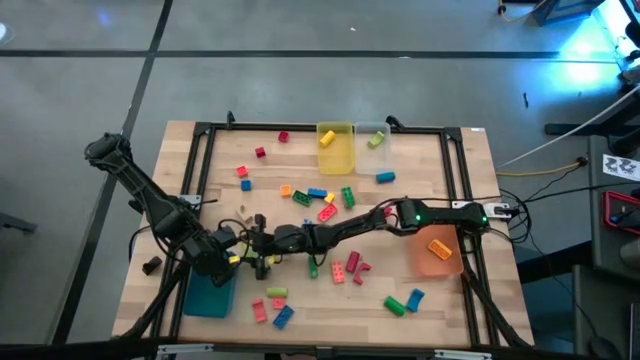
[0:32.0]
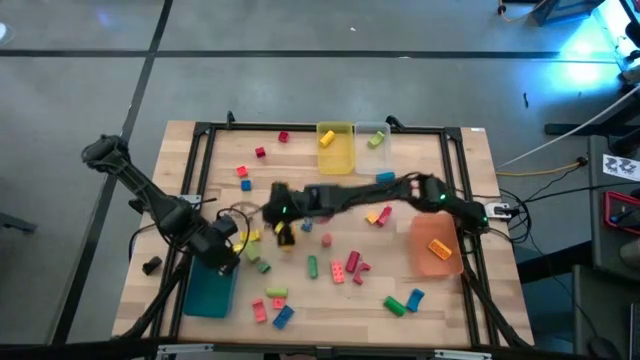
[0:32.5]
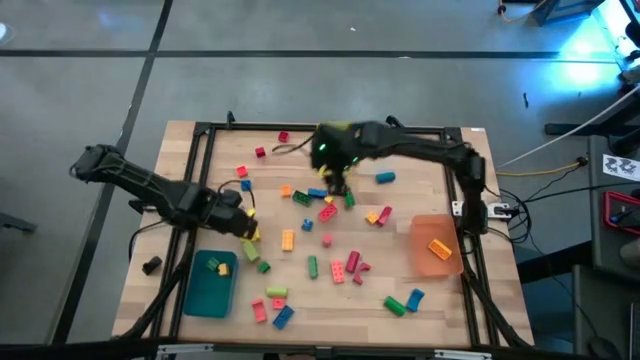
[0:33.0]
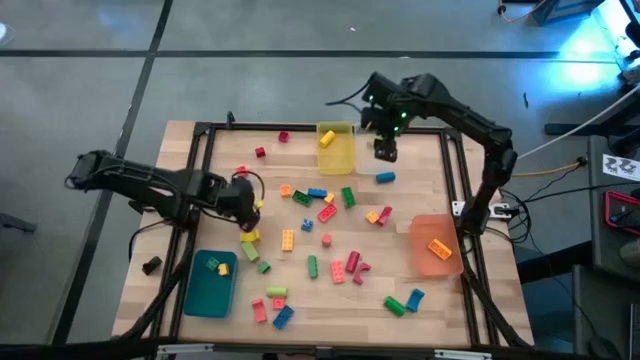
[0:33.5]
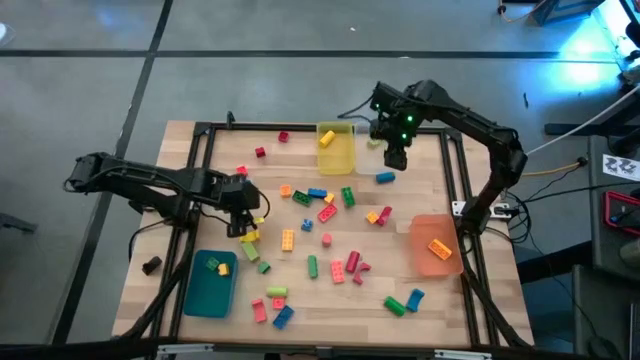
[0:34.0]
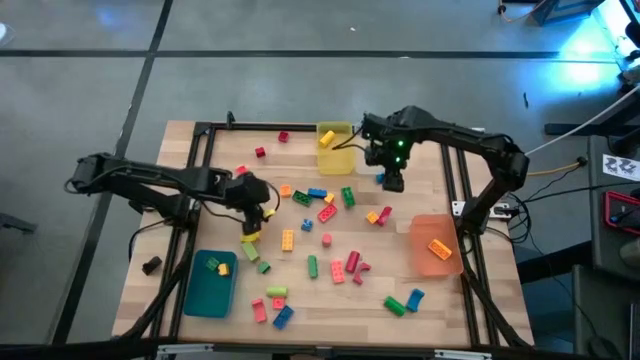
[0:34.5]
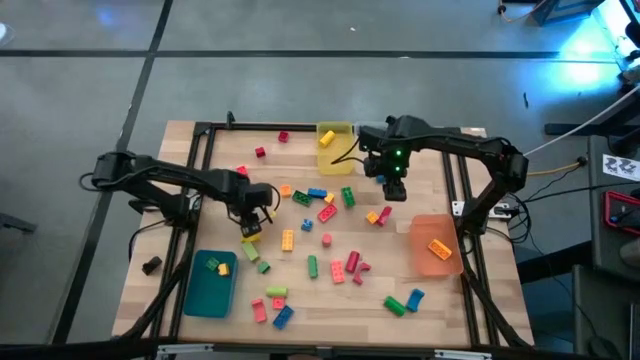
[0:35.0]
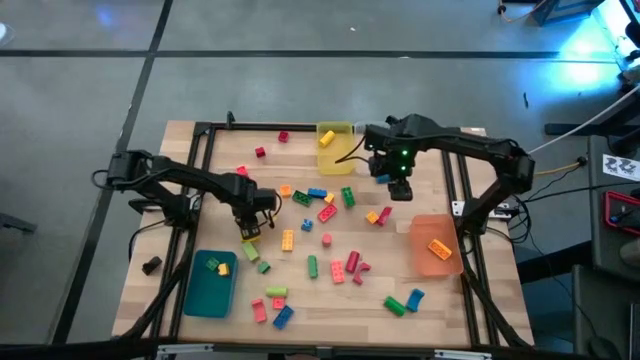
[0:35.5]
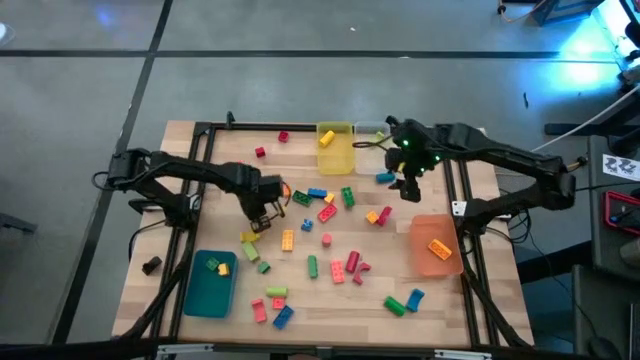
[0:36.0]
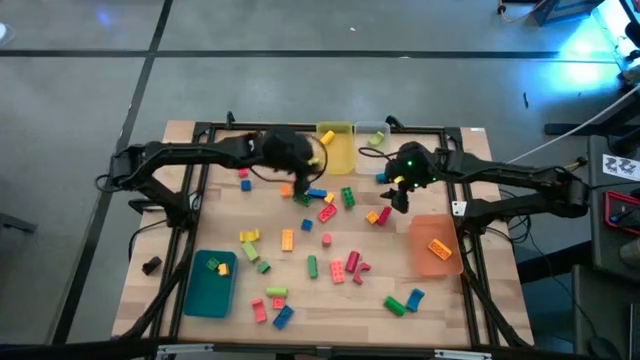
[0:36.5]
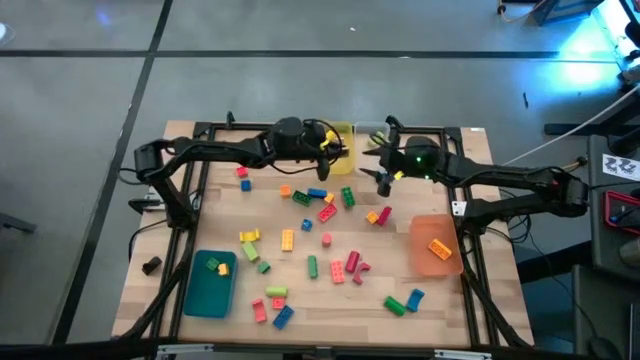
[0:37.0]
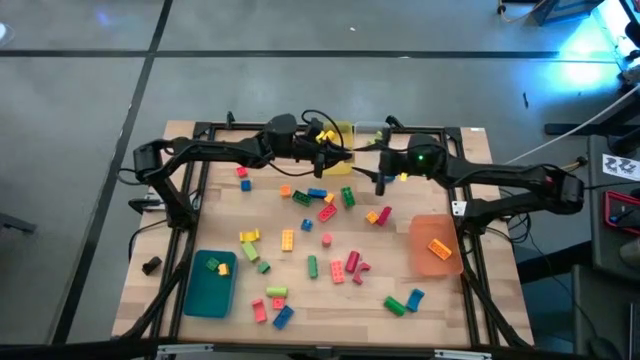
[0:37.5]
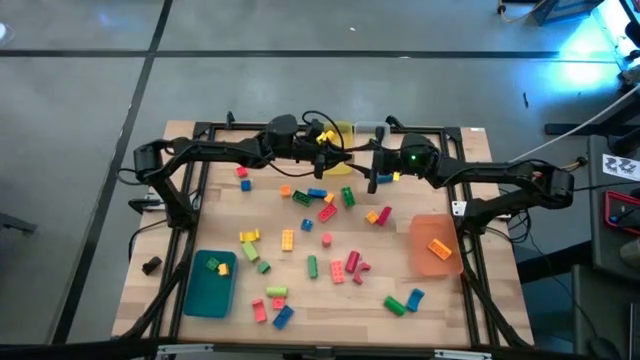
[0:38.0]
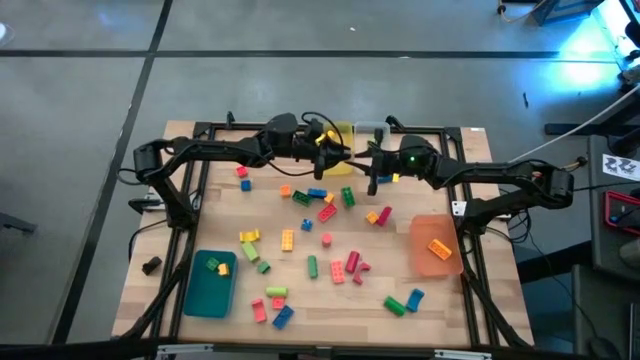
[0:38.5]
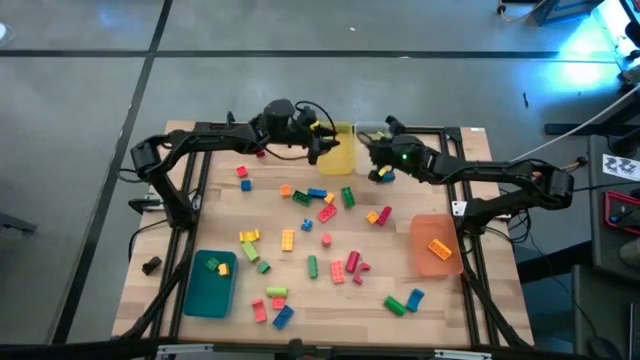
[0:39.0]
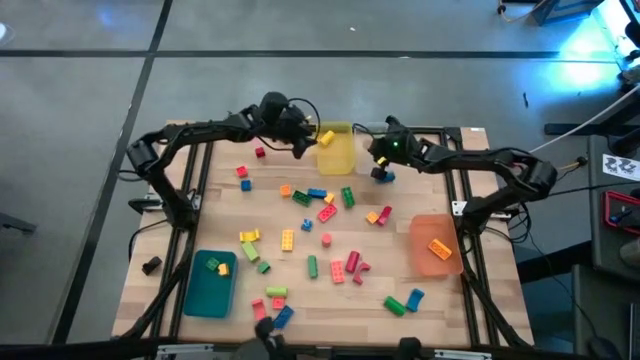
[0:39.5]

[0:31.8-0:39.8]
Task: Sort blocks by size
Put the brown half circle block into the transparent bin

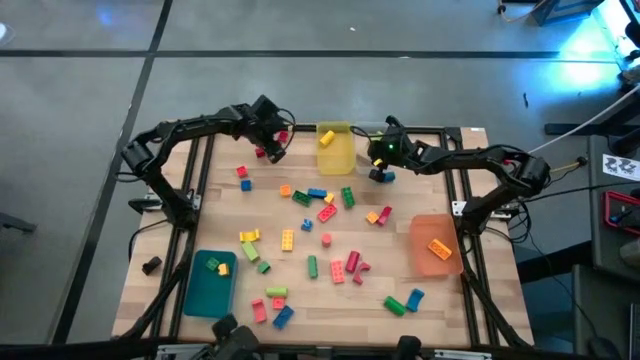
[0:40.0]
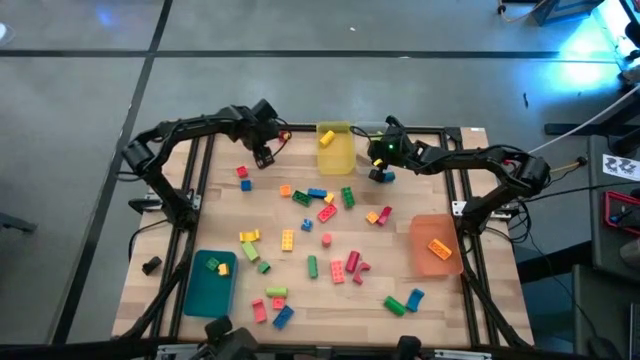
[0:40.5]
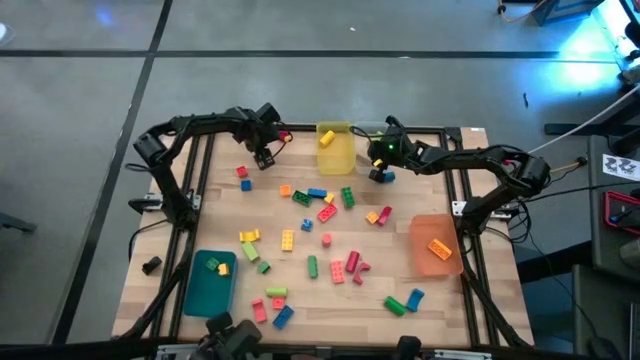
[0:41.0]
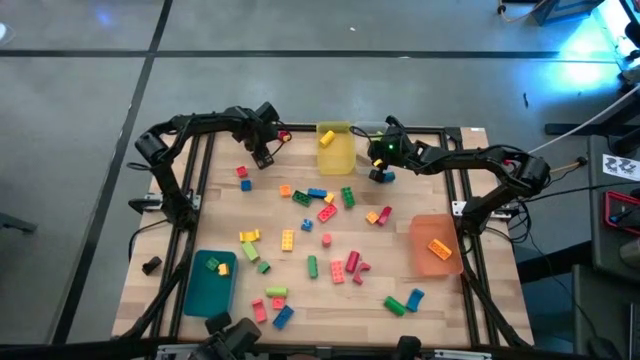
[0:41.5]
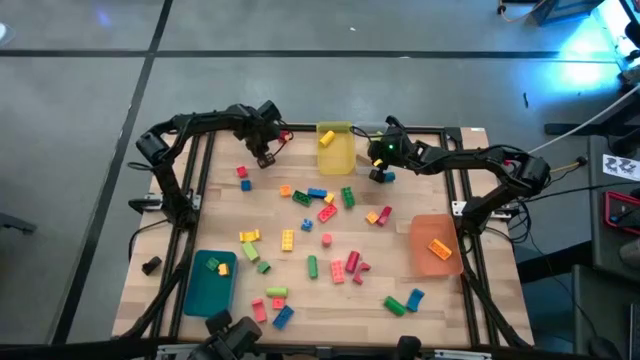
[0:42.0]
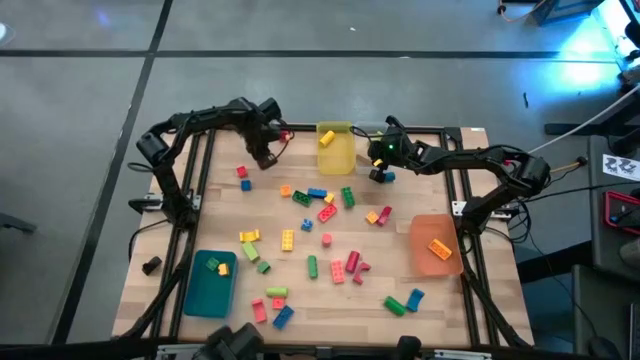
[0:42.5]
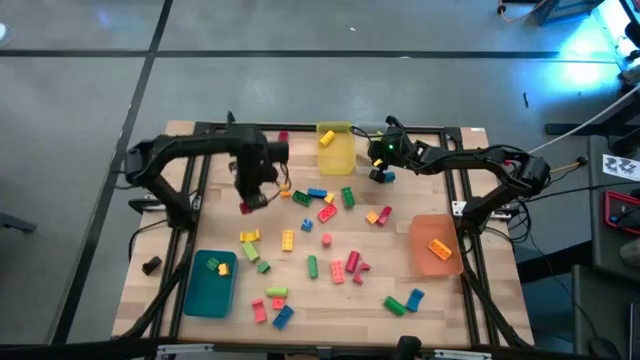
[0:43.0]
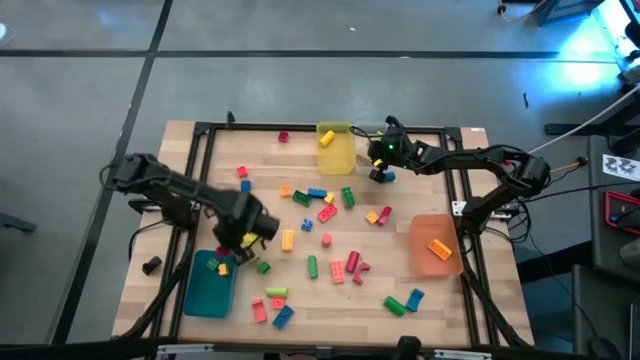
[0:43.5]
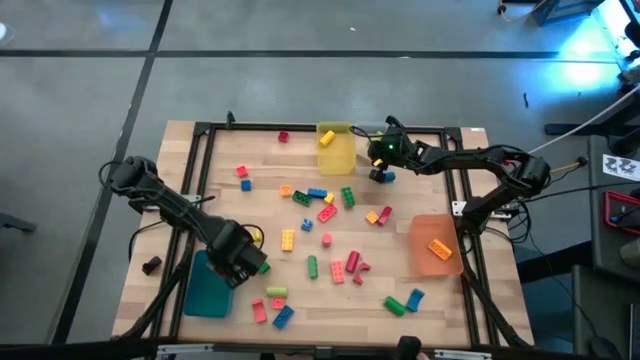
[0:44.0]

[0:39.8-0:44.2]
Put the red square game piece into the blue bin

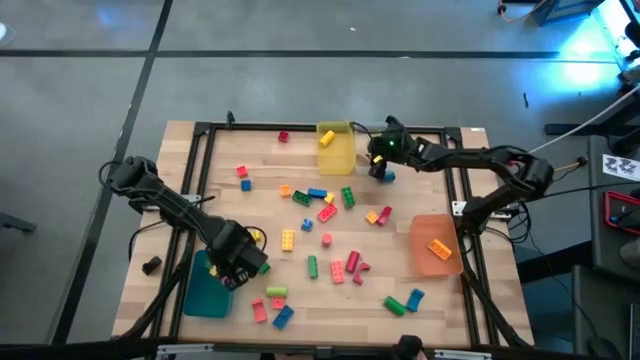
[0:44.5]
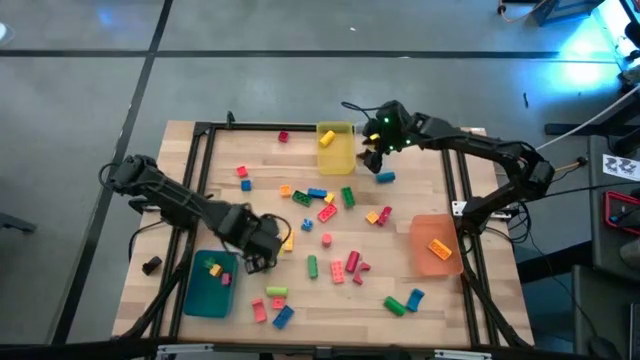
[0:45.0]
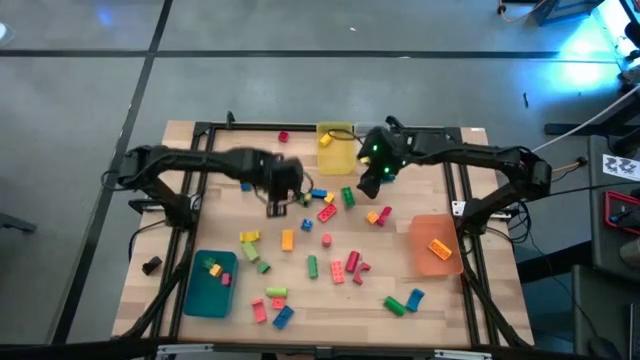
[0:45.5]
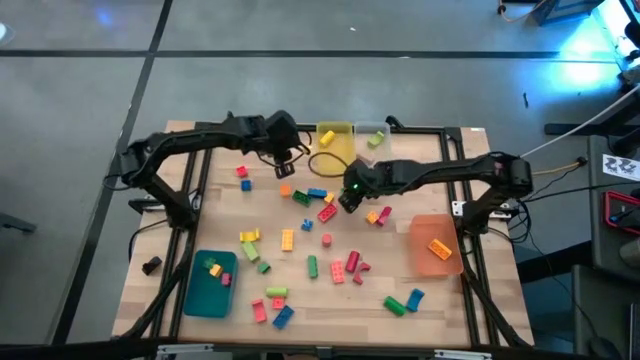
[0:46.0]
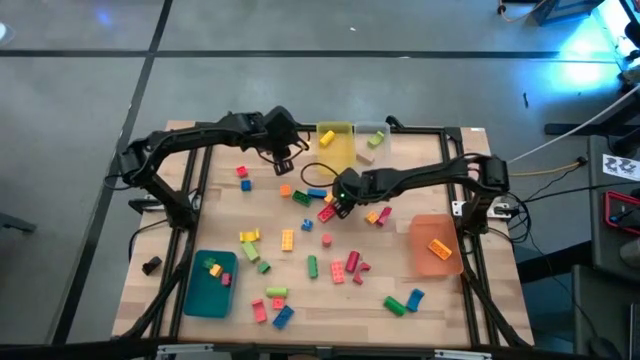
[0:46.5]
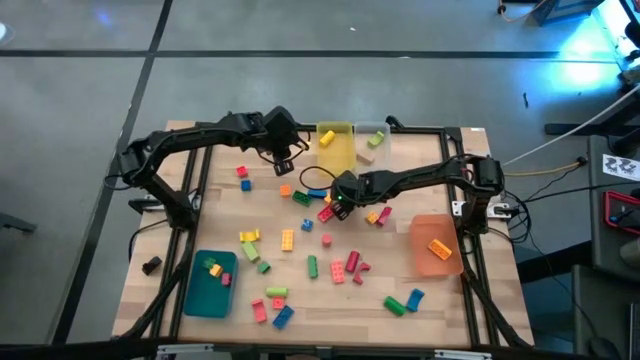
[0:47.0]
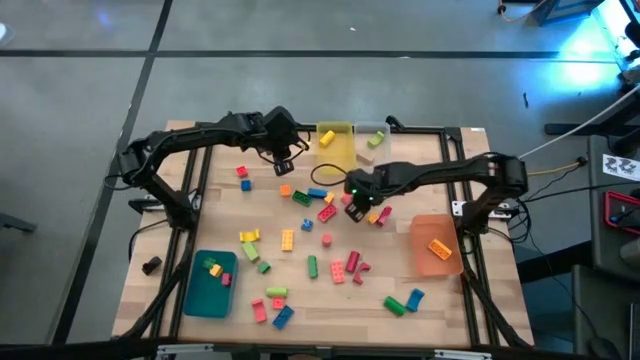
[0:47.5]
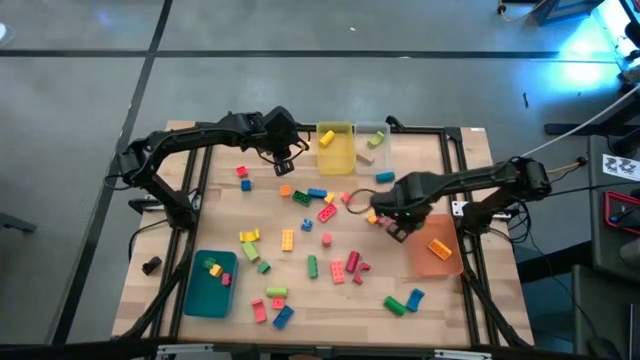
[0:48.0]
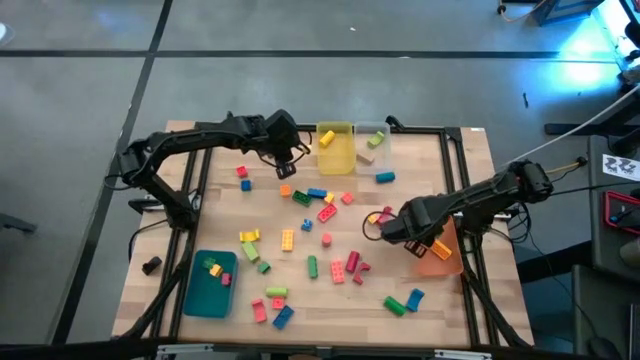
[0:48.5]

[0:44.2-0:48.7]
Put the green rectangular game piece into the orange bin

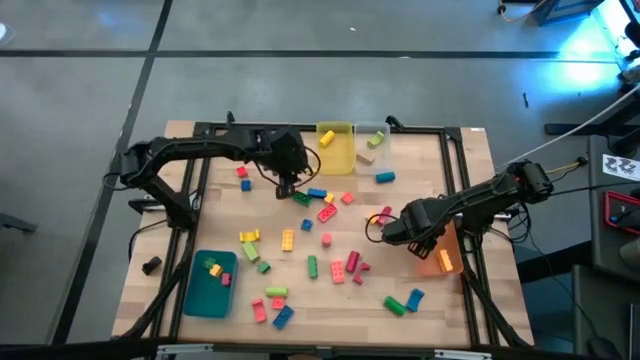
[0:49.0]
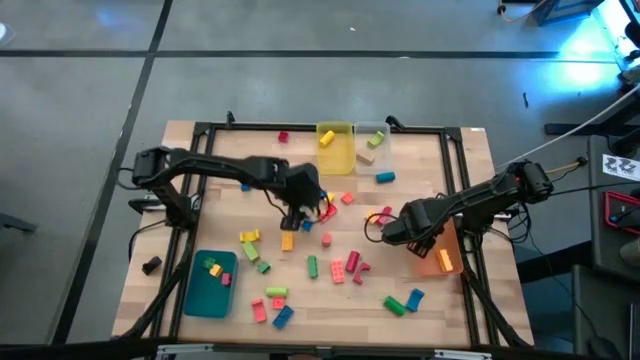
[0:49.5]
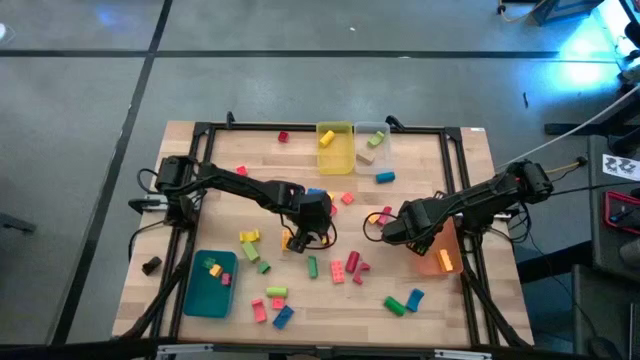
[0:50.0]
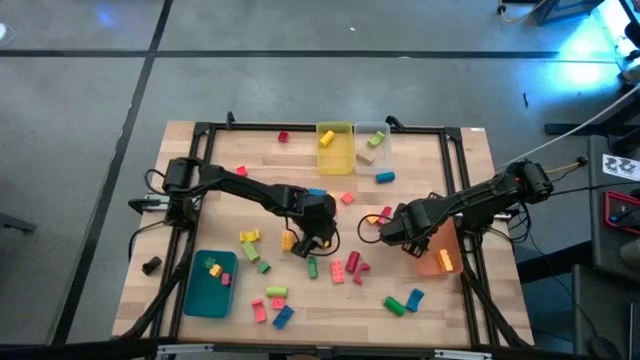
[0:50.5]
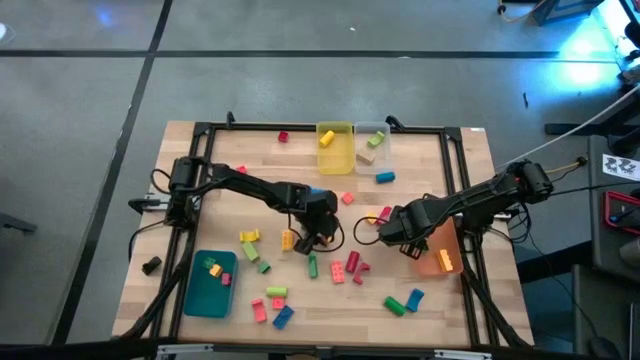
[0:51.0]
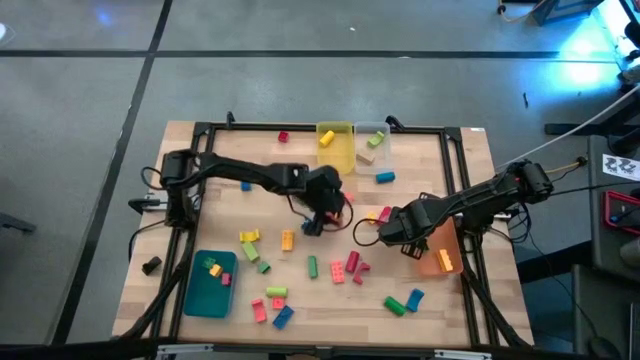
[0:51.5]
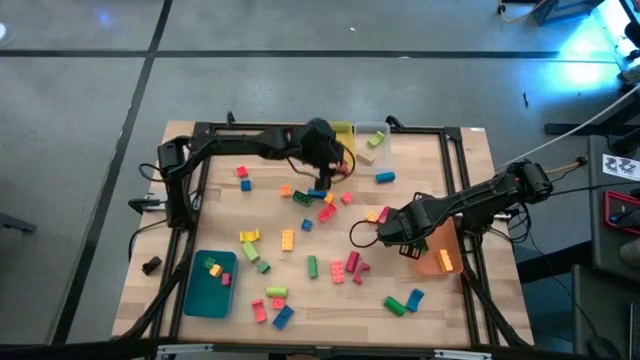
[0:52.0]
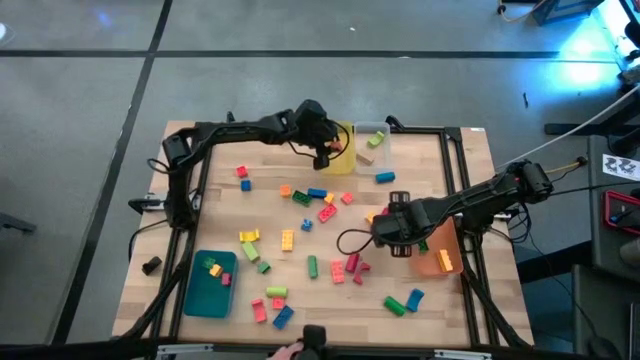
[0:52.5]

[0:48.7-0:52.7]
Put the orange cylindrical block into the yellow bin
